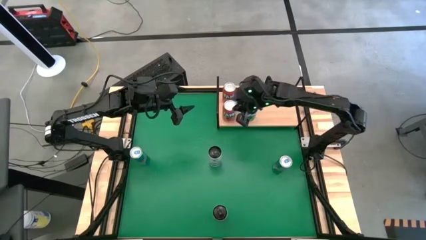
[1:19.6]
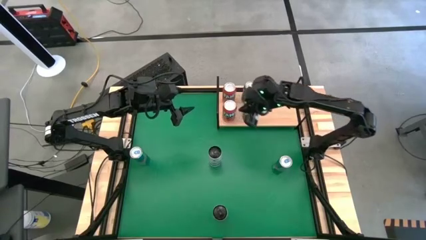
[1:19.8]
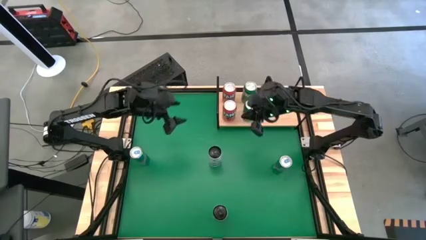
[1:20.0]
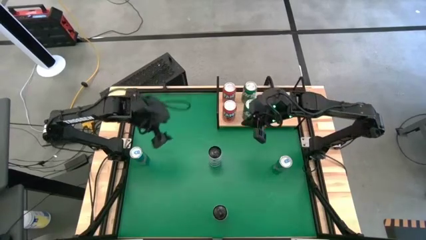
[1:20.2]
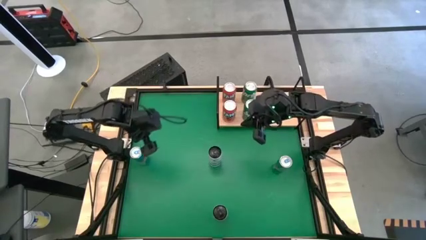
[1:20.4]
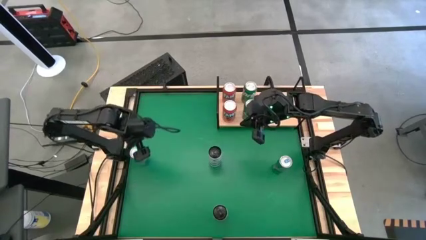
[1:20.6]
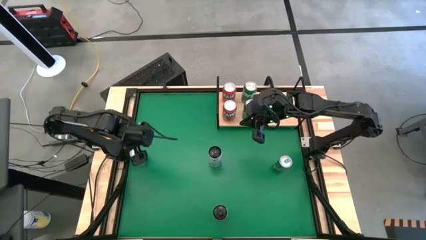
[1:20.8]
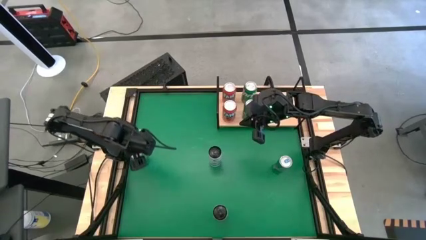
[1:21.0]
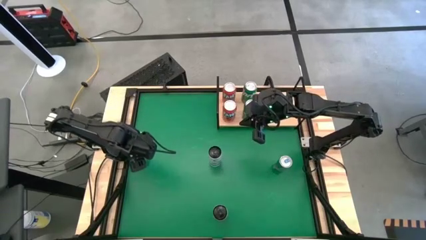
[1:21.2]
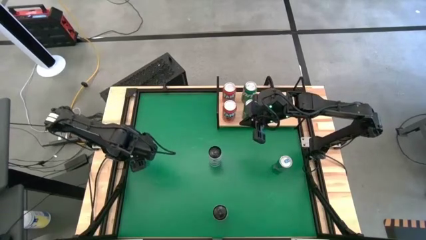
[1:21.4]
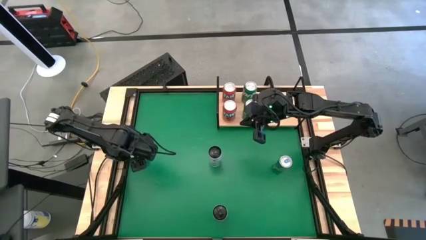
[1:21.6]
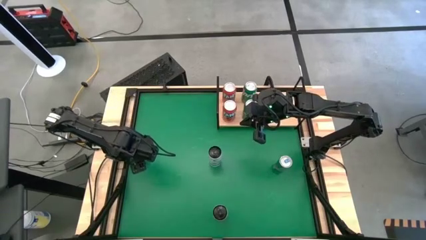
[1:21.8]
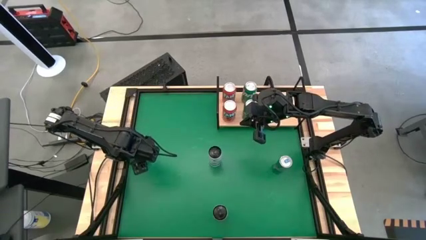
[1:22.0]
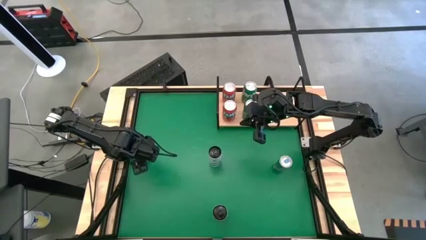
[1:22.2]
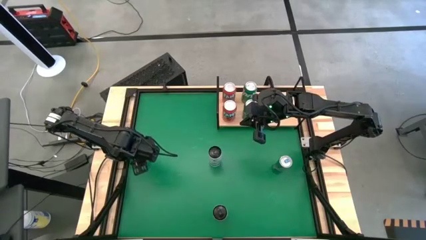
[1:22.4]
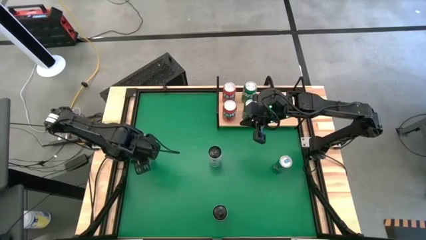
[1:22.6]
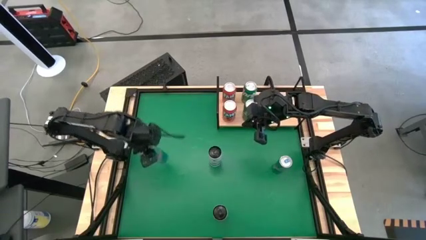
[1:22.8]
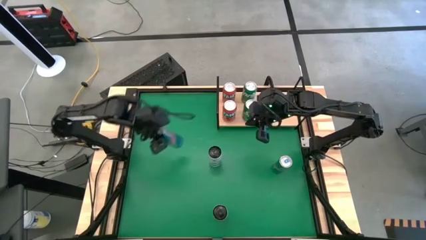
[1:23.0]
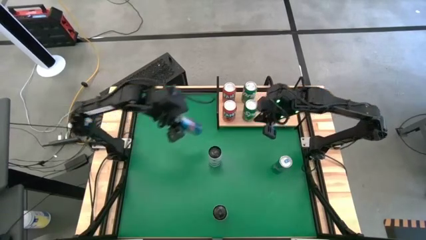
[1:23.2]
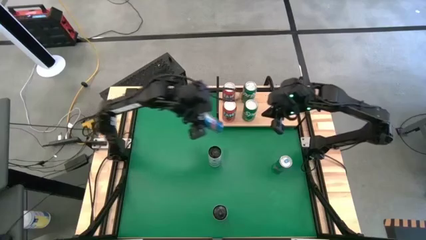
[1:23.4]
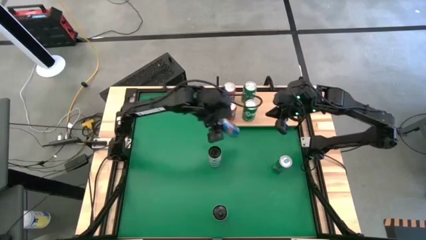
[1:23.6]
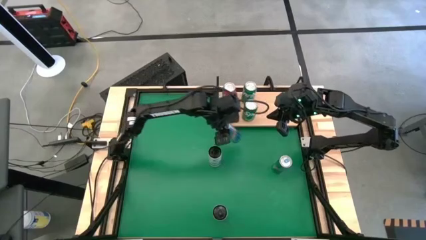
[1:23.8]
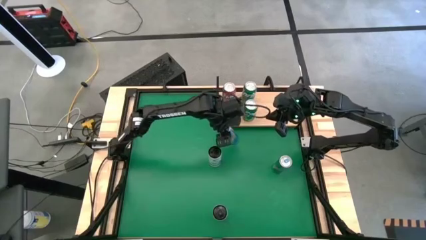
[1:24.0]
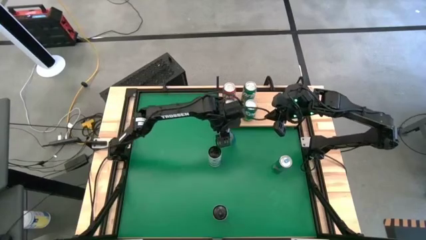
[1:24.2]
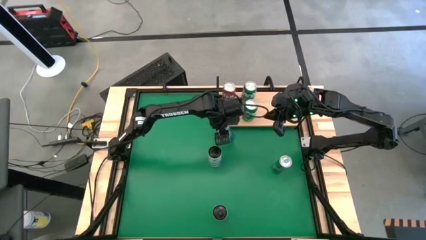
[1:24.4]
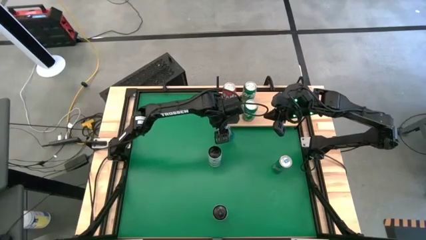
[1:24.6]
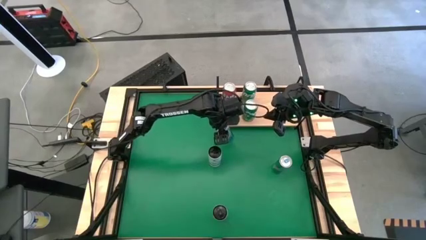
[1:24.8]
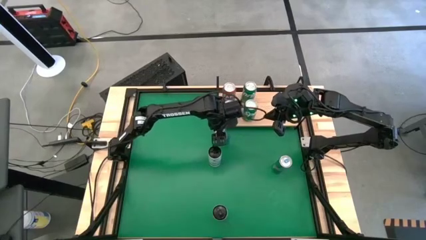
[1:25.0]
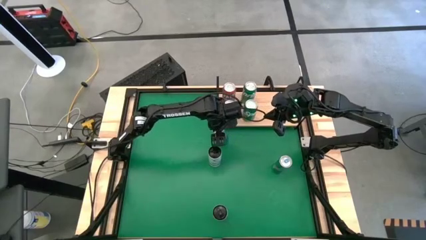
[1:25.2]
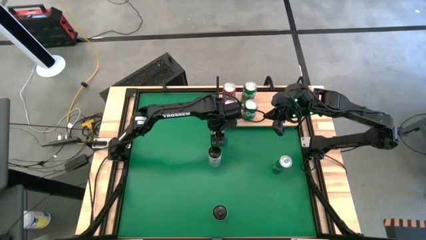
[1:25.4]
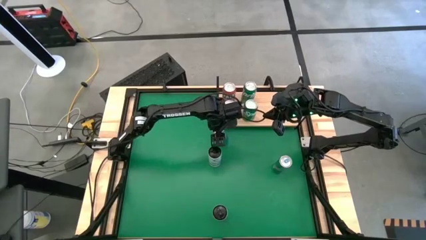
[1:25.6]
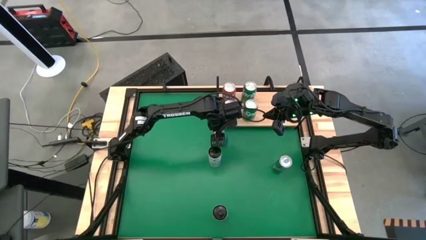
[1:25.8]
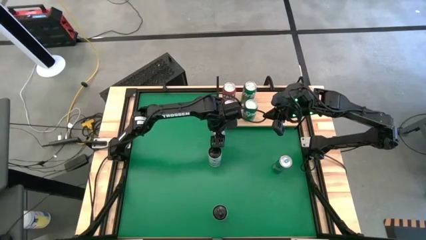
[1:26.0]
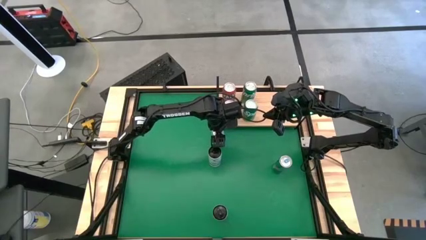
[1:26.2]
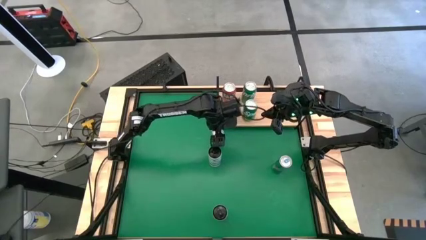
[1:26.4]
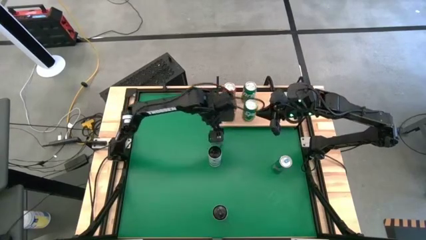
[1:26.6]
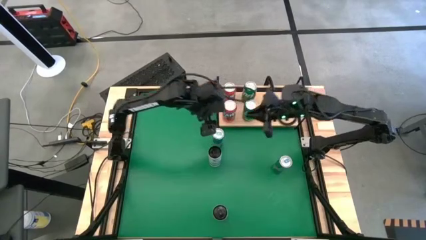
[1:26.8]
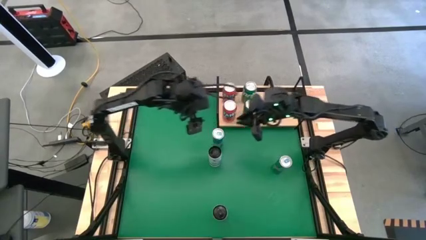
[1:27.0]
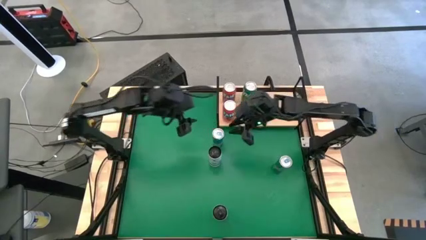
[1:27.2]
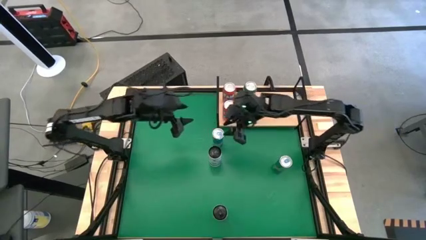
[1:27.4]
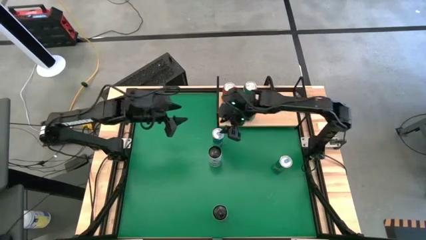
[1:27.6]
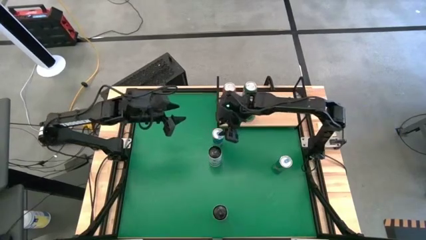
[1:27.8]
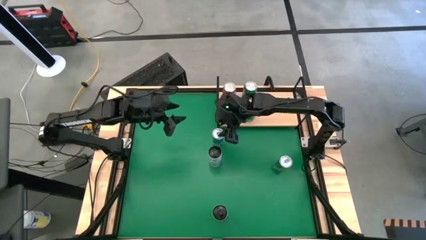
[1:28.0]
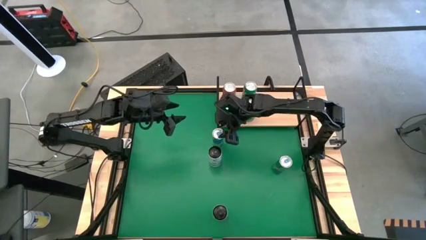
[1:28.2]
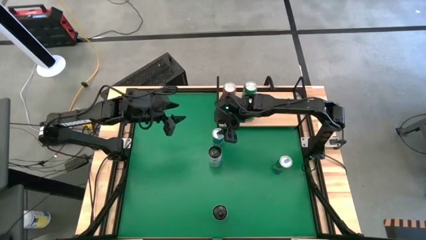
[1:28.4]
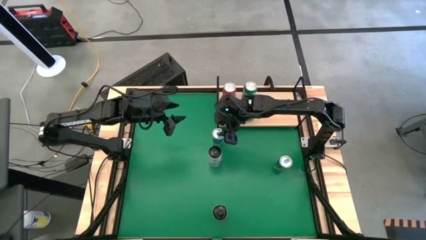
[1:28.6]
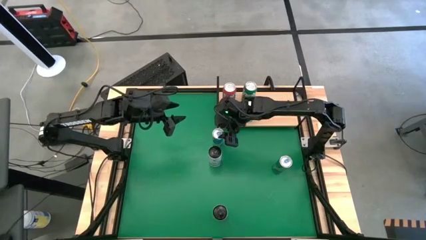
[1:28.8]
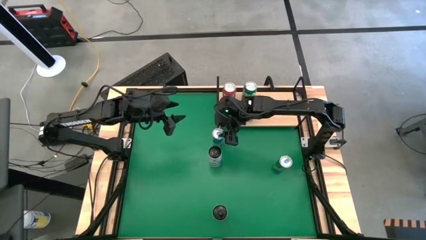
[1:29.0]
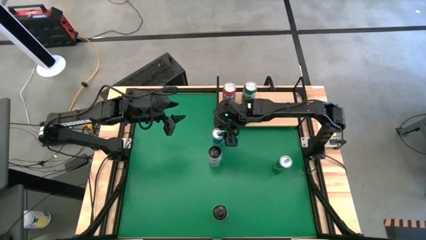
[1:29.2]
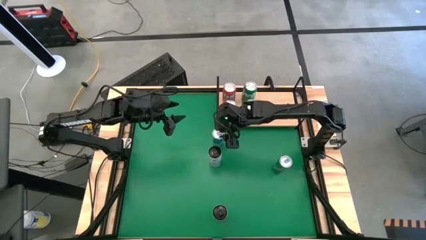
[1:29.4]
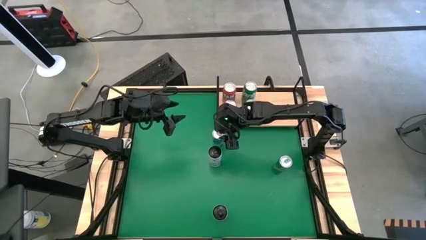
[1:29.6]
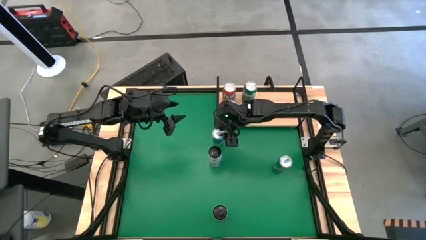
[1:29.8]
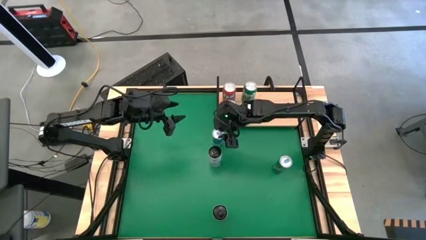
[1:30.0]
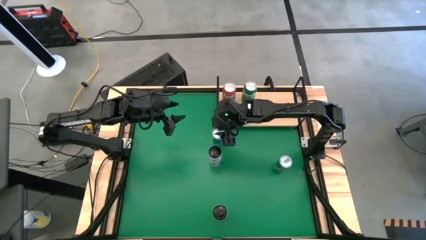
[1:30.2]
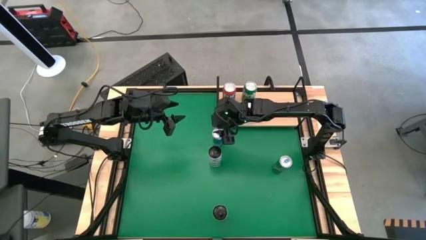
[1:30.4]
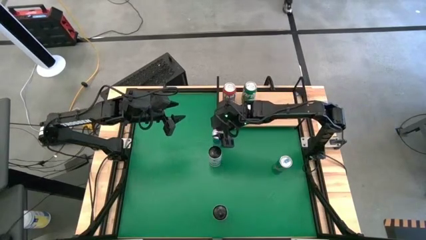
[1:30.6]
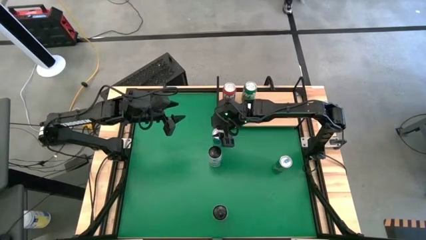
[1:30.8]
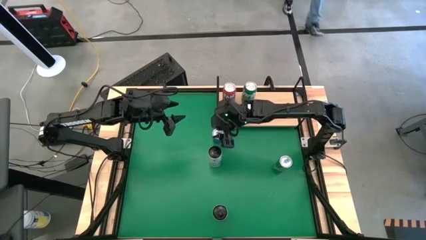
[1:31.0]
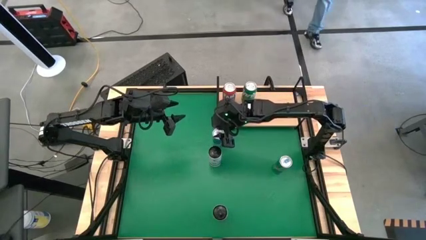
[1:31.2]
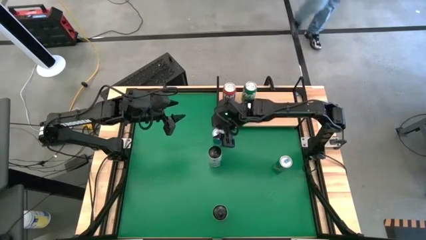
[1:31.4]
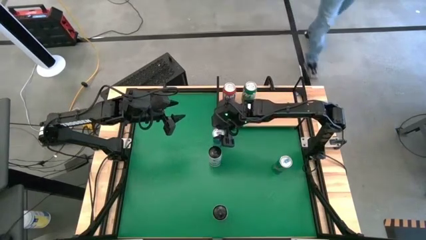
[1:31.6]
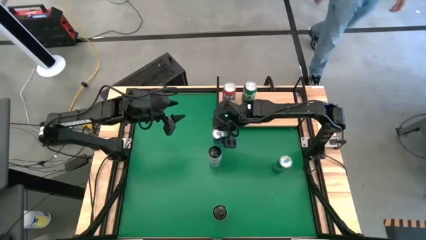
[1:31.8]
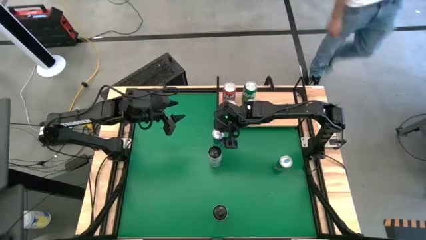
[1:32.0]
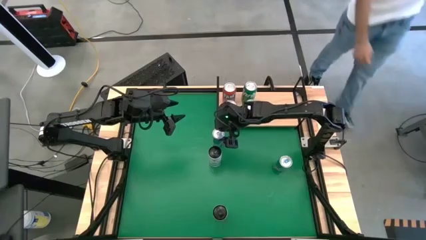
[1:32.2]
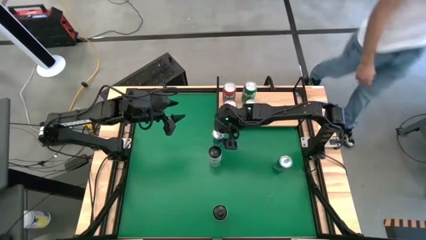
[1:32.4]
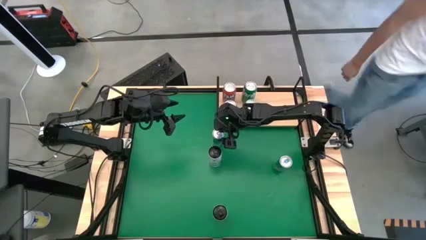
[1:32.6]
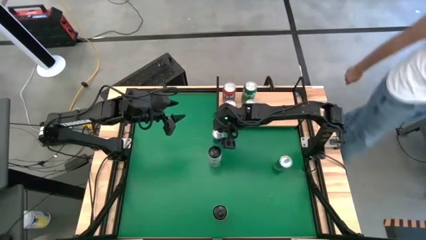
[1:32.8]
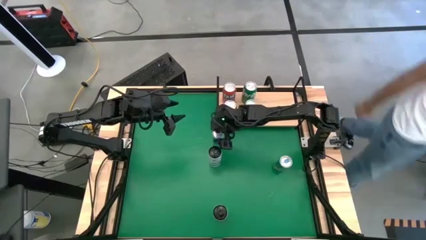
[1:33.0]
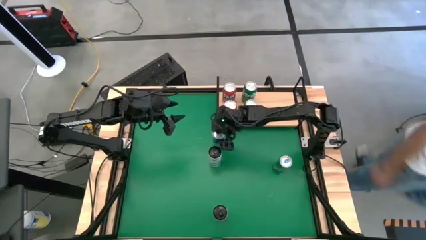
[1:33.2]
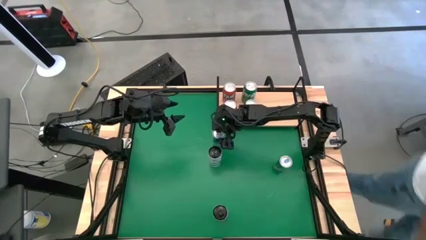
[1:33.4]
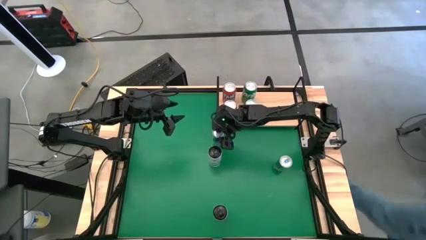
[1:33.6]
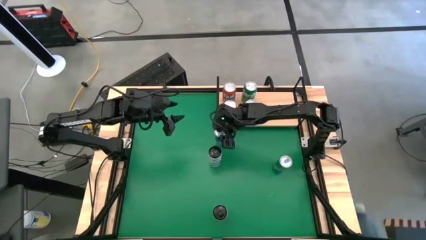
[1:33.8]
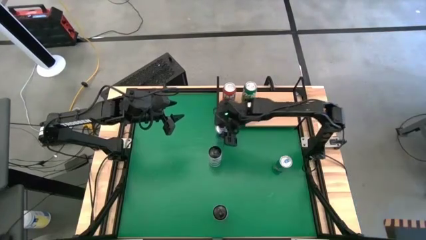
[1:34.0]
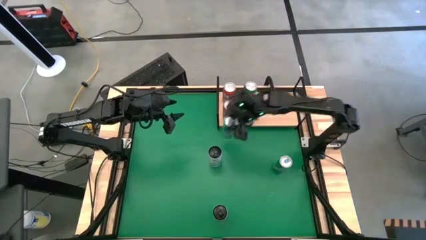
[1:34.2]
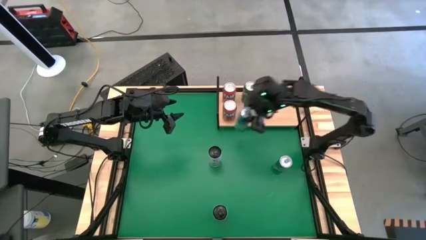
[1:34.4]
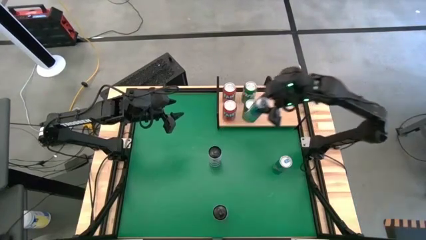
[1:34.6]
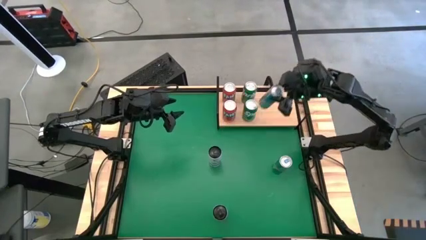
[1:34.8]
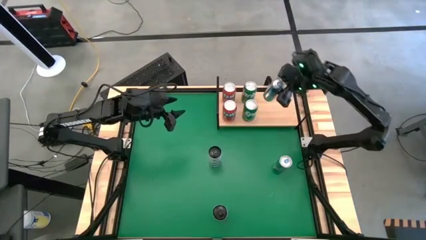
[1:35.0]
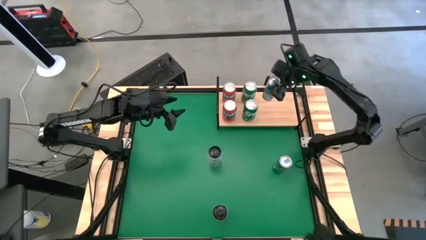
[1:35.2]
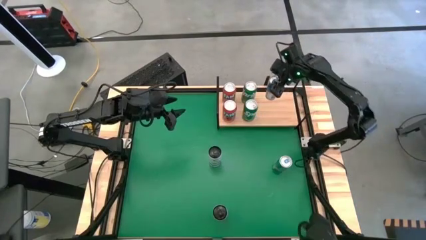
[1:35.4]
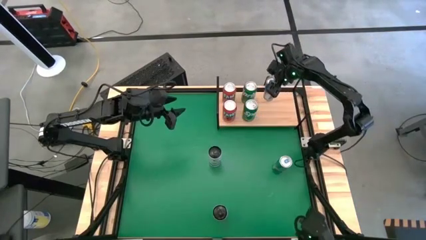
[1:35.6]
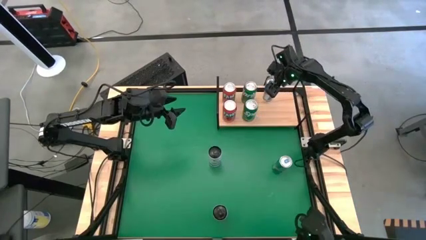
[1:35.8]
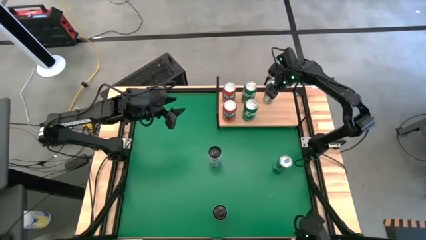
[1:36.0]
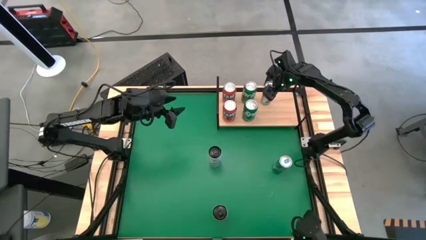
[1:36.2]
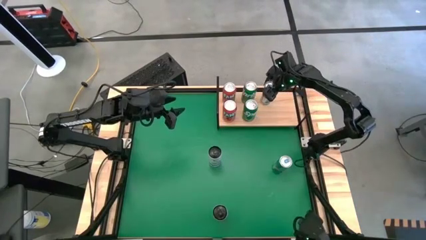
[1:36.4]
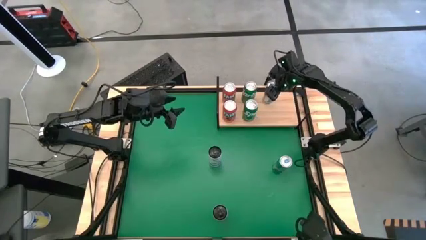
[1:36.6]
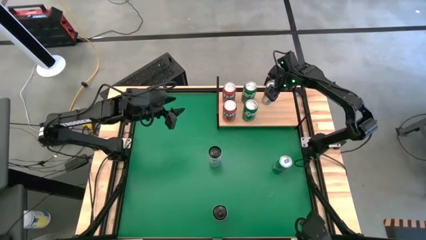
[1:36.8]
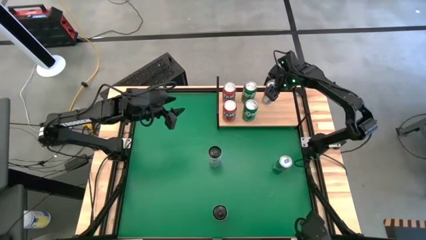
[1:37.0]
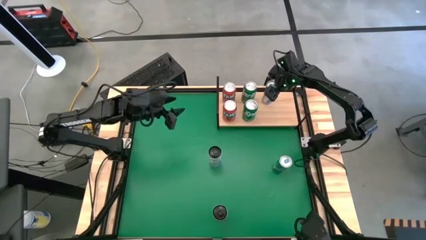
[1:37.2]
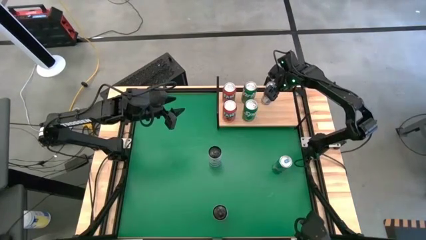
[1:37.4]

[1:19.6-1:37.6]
Task: Place canned beverage on shelf
Put the left blue soda can on the shelf
